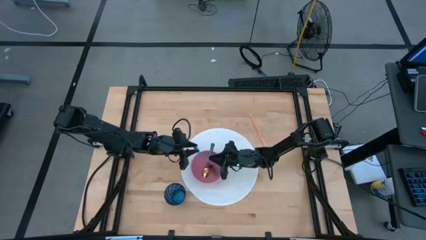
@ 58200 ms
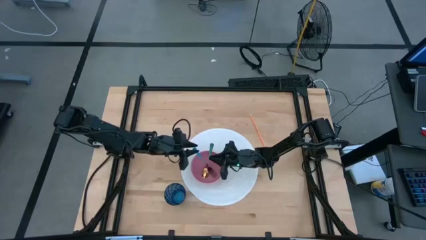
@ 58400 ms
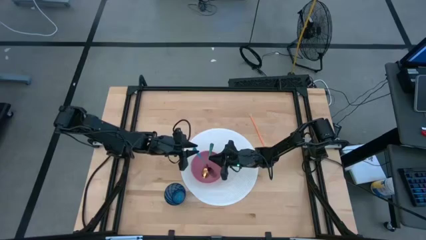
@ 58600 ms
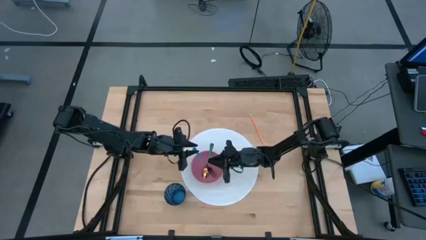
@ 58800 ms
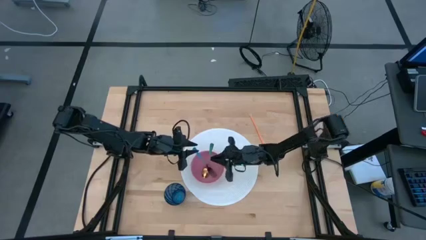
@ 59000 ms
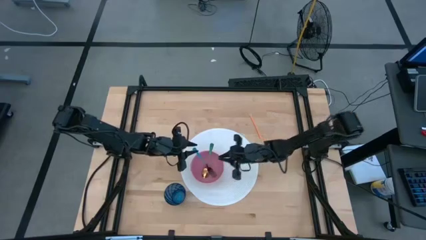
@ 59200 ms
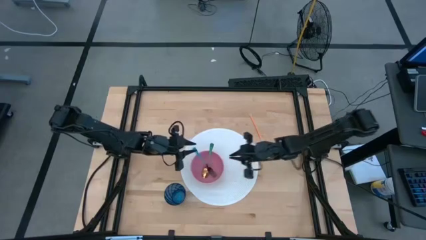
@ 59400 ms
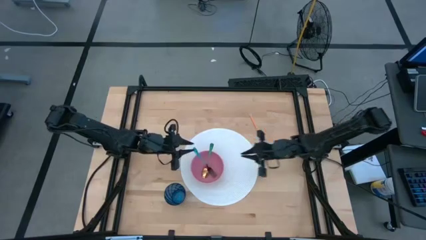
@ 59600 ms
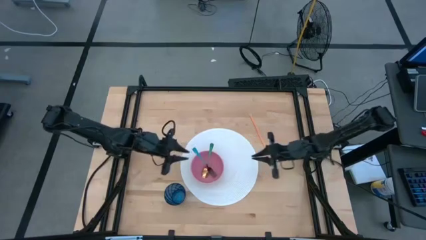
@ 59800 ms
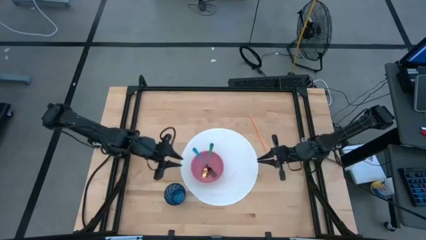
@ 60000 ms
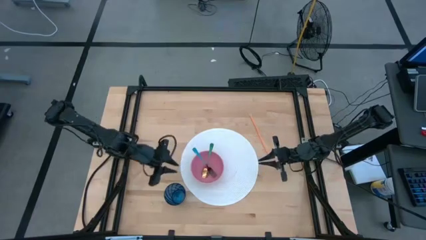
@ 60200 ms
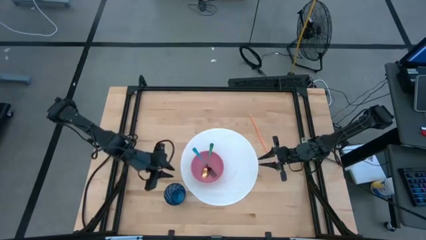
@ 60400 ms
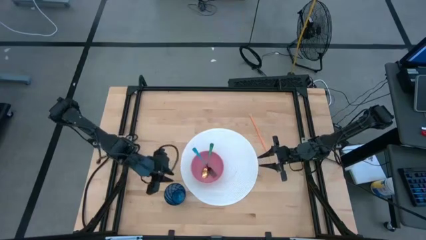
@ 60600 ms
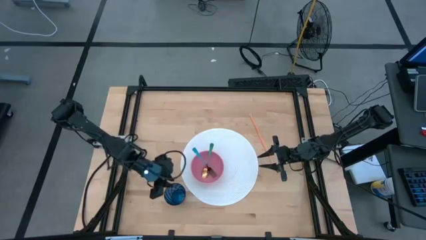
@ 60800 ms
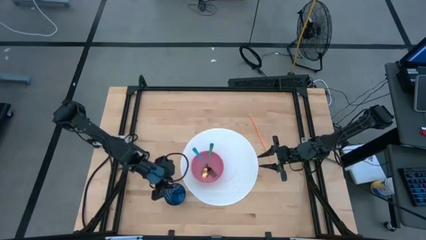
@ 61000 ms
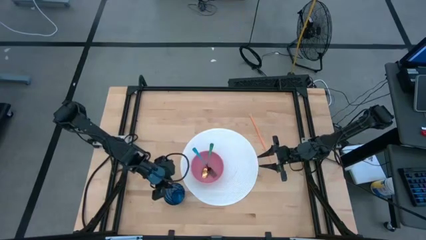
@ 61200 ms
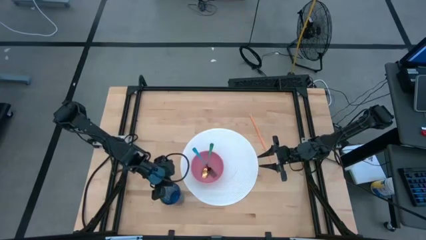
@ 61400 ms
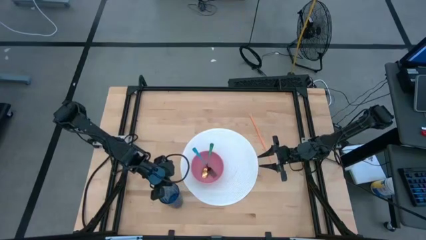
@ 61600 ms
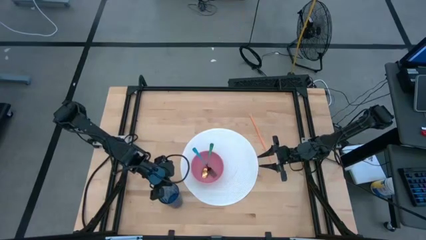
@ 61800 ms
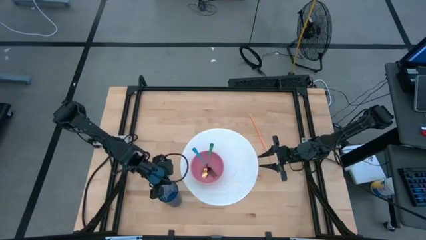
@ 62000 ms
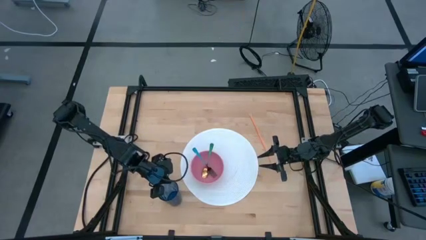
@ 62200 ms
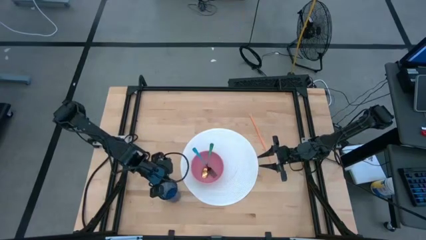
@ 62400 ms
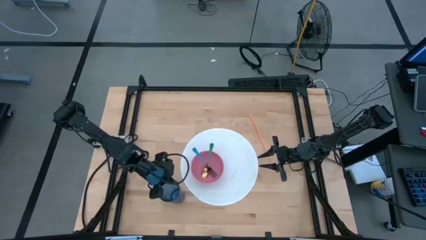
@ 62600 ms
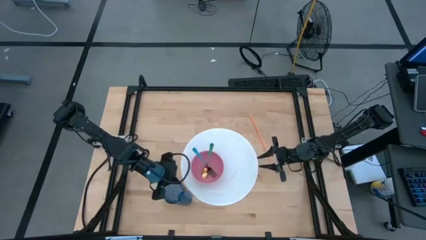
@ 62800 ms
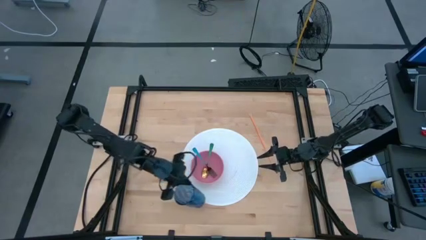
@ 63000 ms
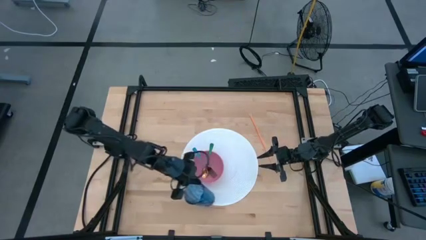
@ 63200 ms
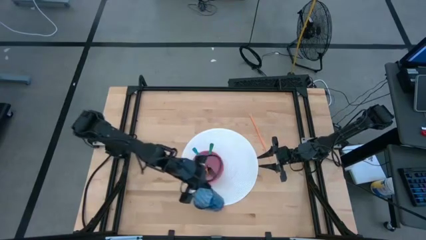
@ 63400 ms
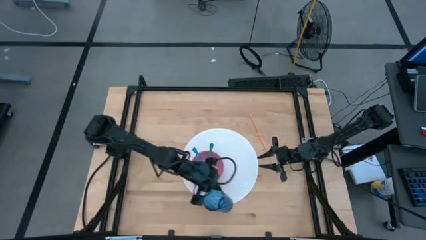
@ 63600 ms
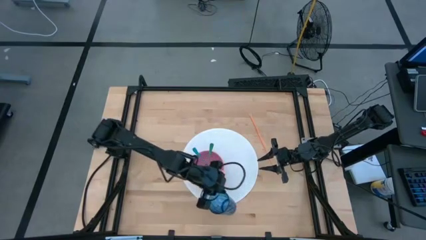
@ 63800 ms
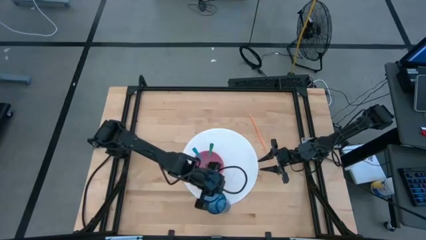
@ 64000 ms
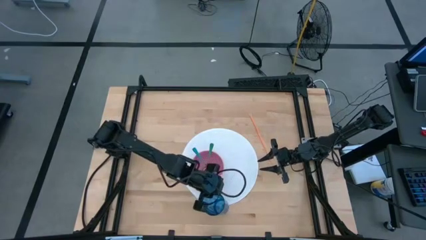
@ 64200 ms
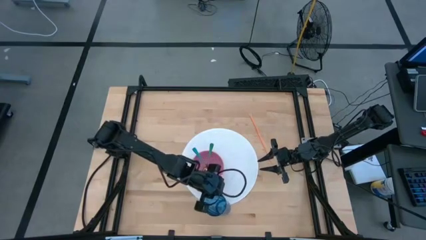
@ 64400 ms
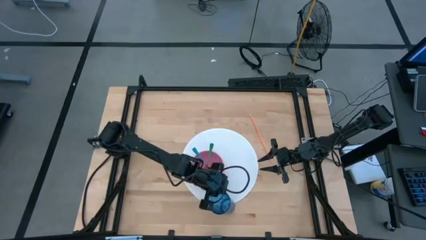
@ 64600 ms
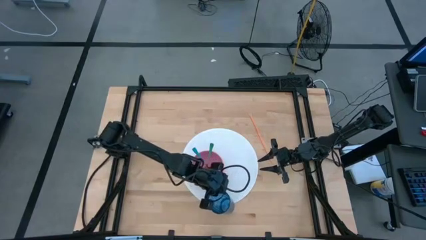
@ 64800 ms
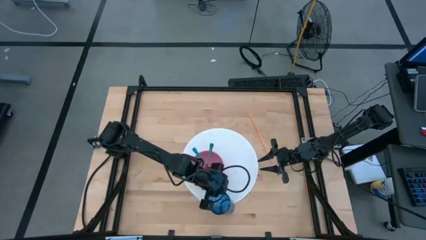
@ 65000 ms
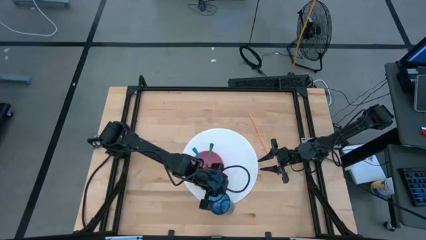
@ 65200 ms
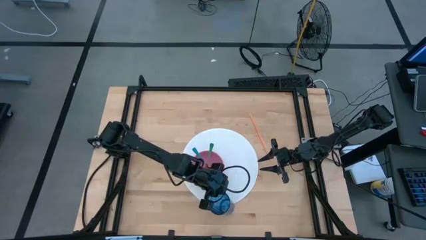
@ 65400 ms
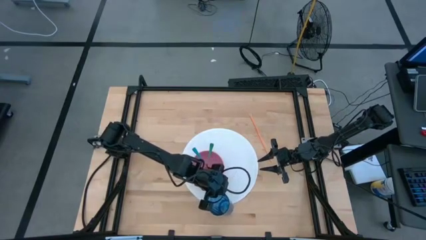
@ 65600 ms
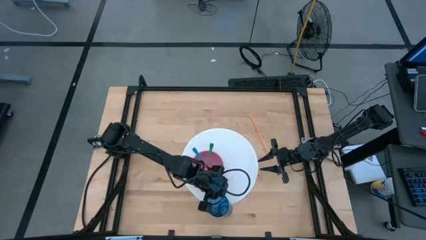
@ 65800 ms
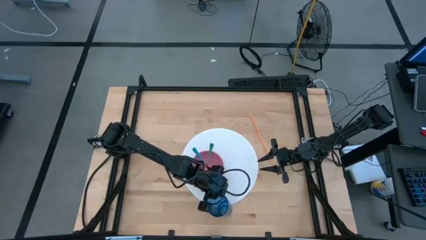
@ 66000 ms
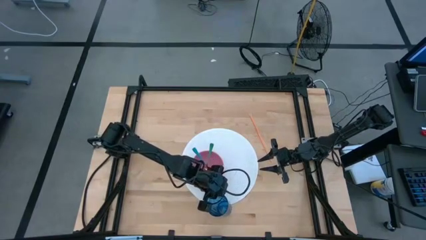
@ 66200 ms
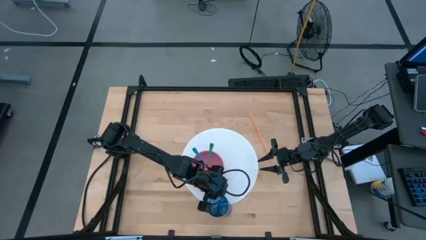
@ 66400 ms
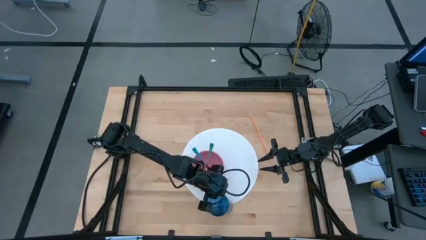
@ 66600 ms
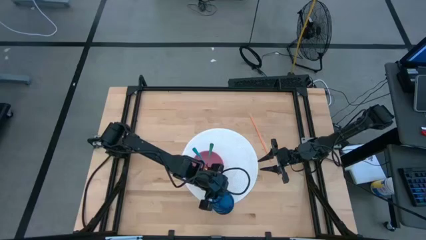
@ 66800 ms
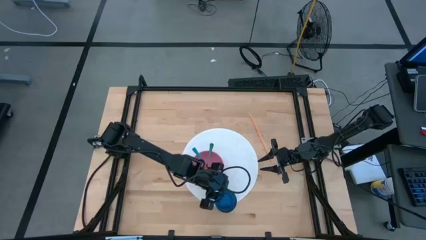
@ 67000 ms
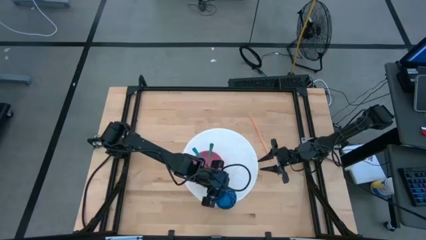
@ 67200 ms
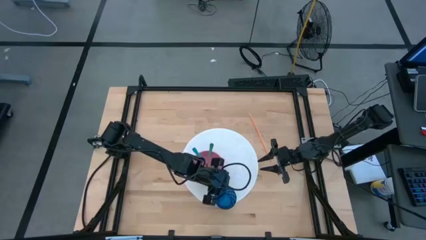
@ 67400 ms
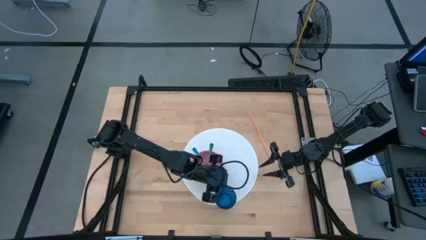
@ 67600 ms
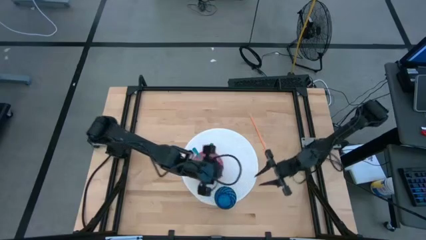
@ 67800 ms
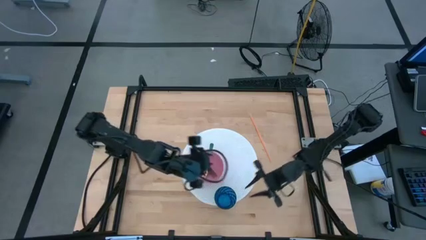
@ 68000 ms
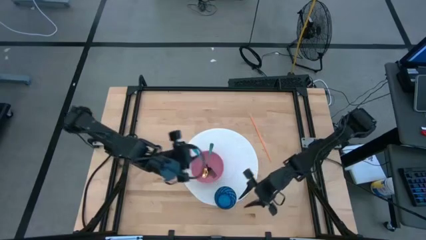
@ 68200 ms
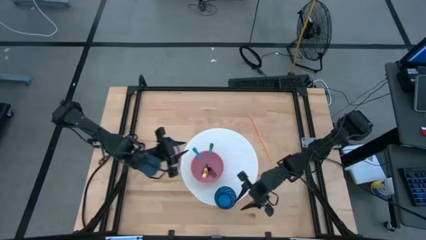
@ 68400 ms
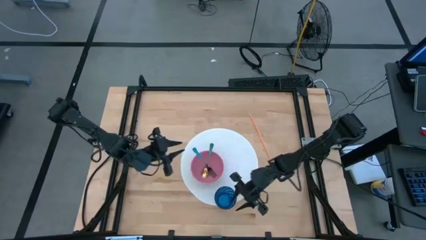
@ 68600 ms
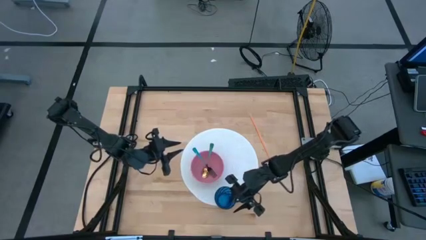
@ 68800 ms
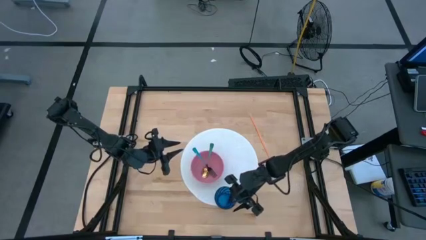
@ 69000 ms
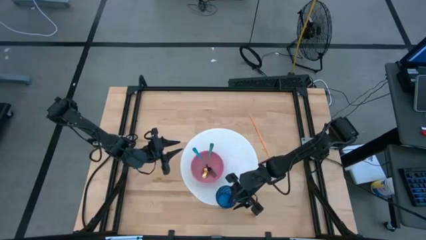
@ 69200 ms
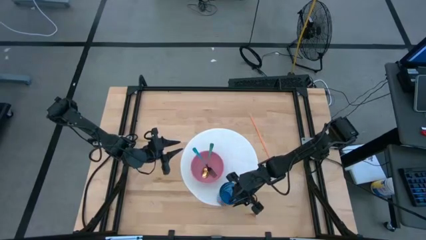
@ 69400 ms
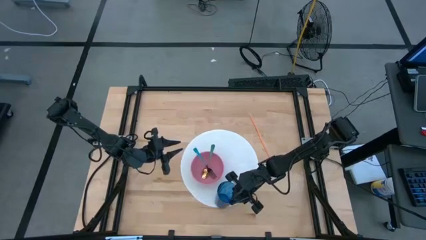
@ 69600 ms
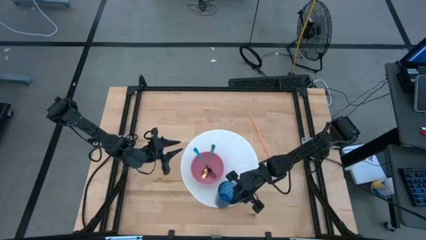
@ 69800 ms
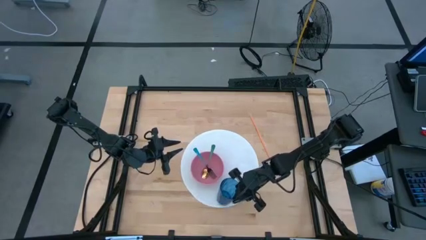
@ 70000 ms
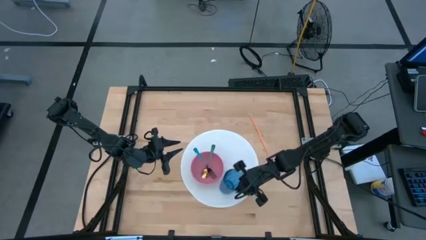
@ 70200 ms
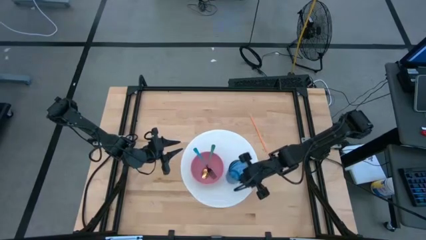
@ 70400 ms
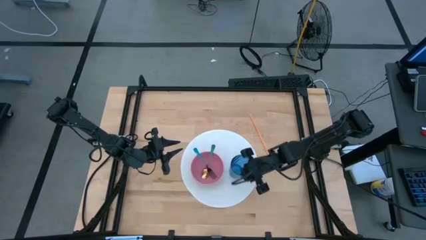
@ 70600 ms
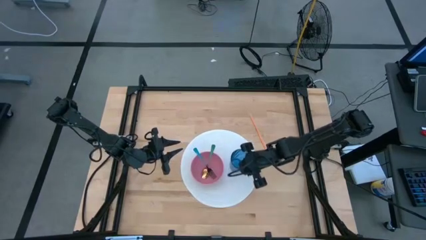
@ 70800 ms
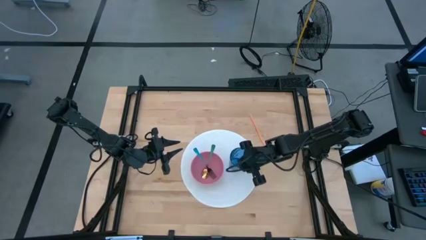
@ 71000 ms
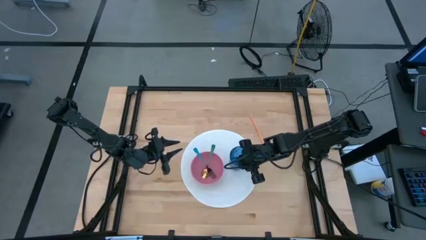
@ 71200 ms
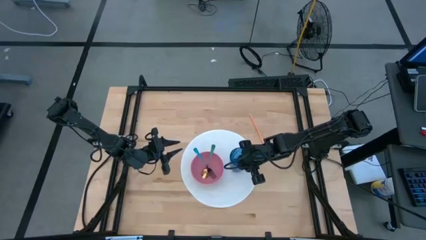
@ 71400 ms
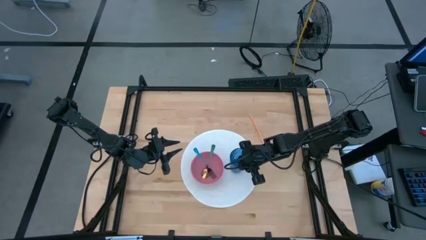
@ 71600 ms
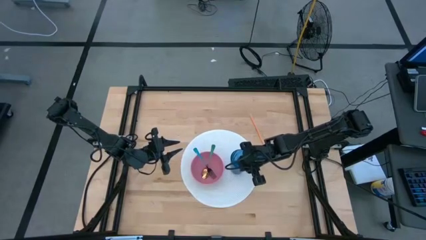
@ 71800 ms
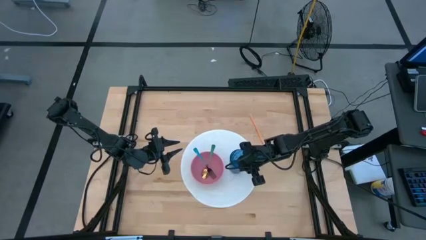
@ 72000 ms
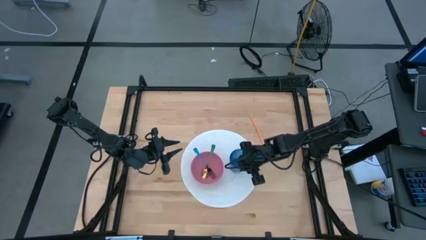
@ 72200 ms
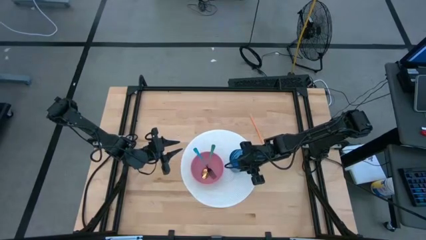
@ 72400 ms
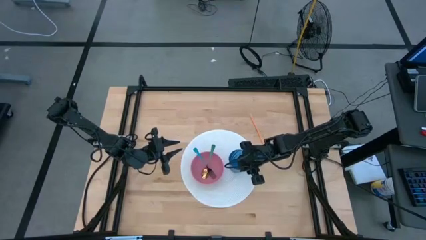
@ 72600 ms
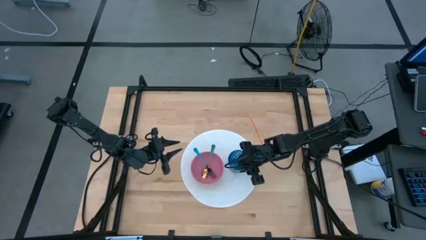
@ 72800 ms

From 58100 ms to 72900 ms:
Task: Pick & Place Utensil
Put the blue cup on the white mat to the right of the pink bowl

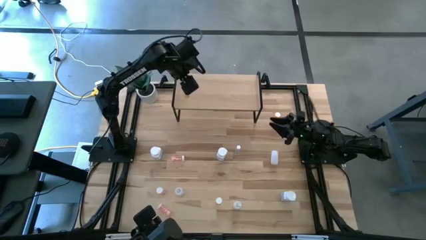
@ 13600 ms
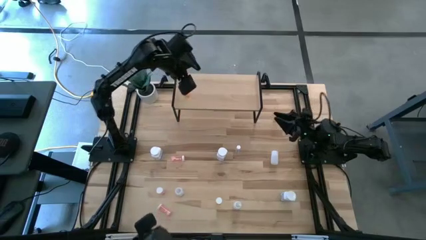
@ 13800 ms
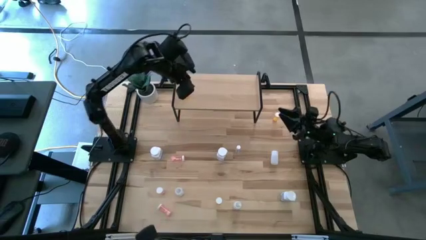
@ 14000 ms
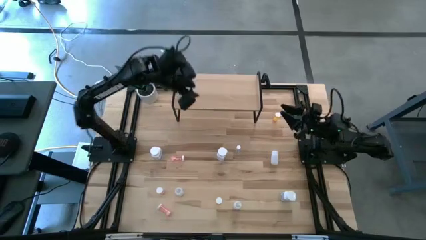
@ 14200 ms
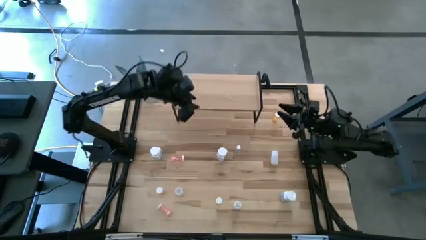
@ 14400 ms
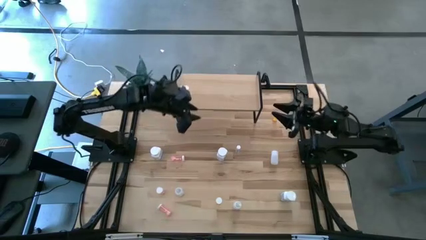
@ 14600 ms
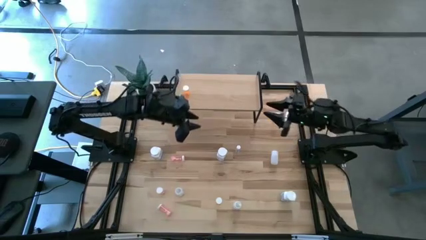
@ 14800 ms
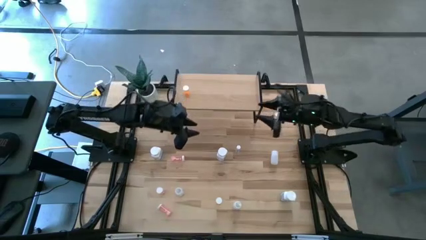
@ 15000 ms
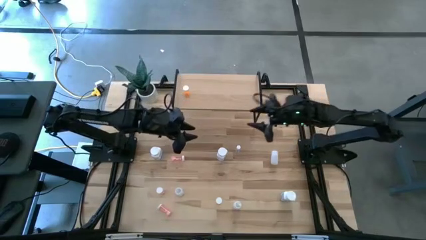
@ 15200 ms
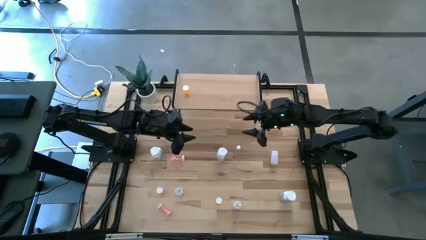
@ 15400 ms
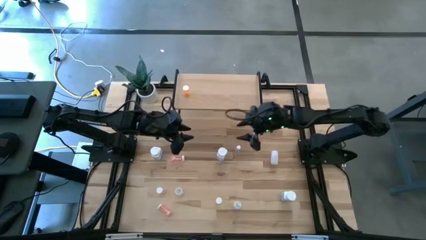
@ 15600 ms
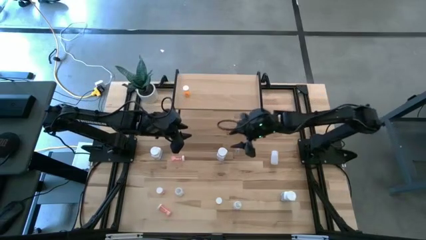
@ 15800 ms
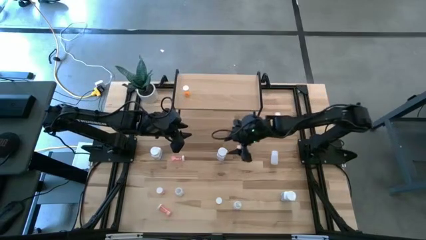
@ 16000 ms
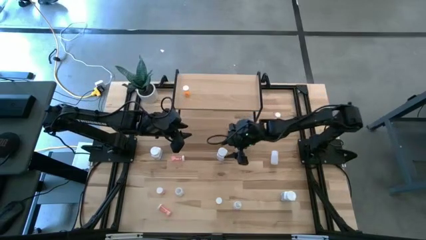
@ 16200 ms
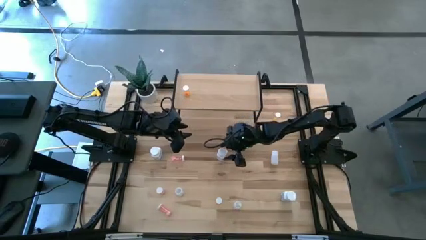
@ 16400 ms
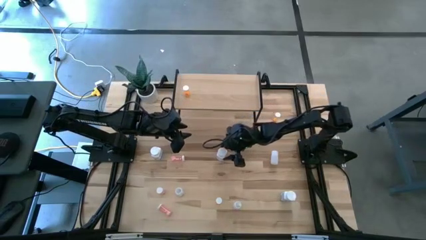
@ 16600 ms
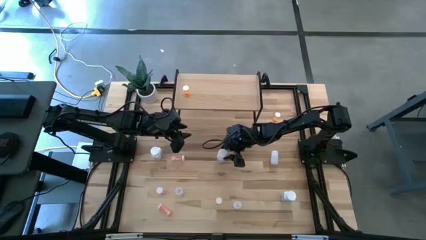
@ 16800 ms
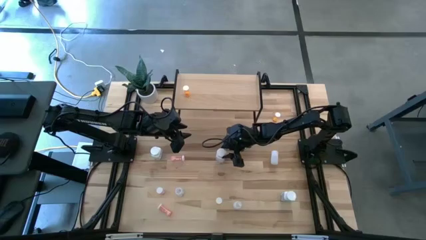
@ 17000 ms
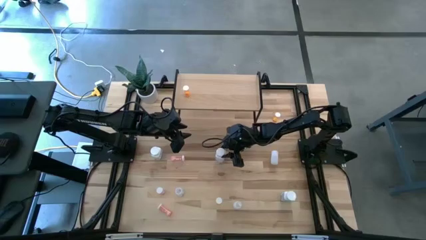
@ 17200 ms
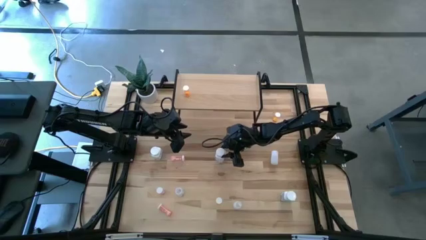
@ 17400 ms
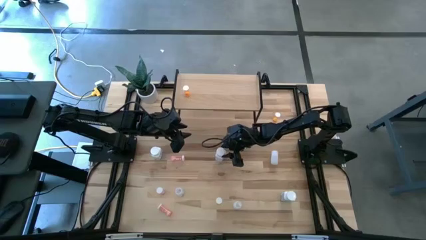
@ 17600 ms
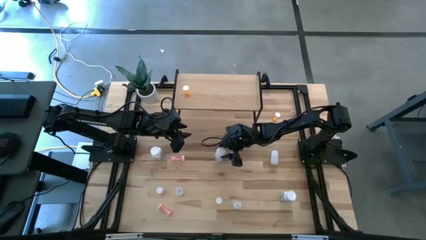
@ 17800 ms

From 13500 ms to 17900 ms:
Task: Pick and place medicine bottles onto shelf by color
Put the top blue pill bottle on the shelf
